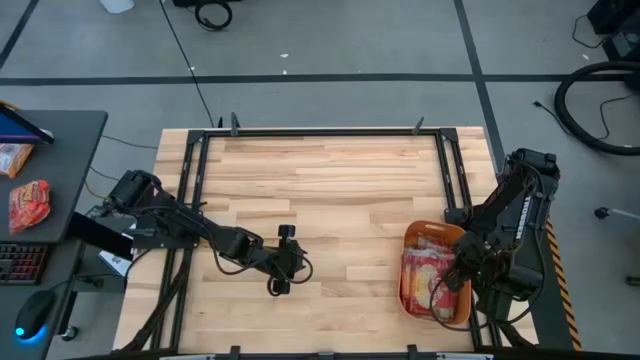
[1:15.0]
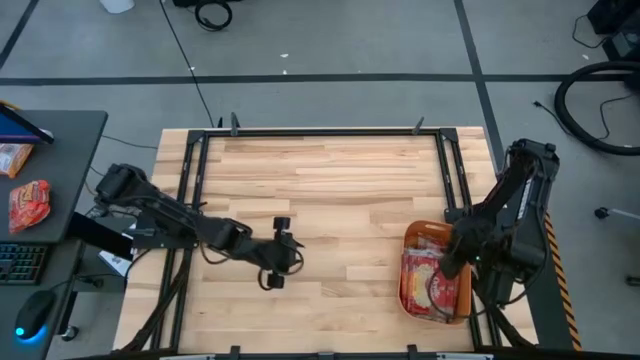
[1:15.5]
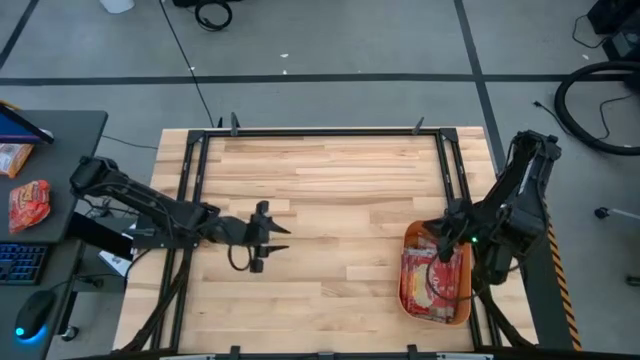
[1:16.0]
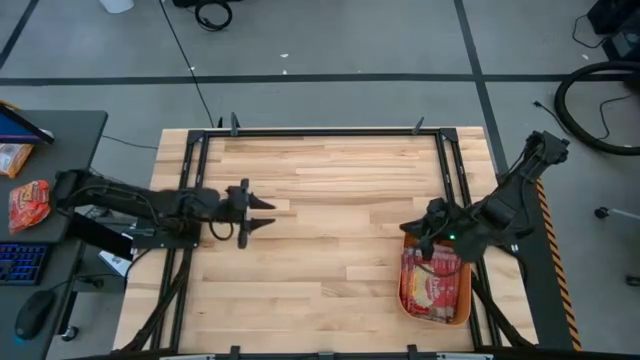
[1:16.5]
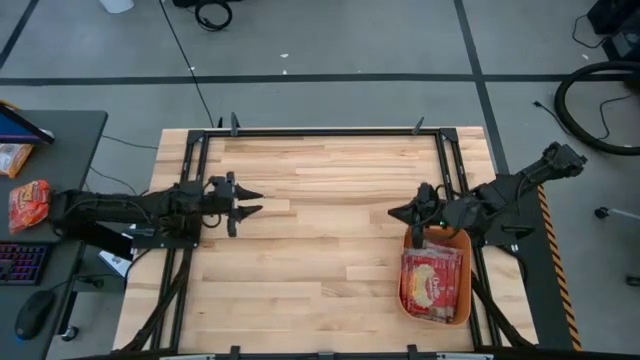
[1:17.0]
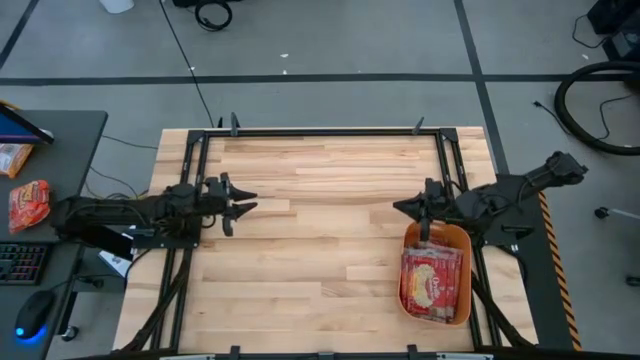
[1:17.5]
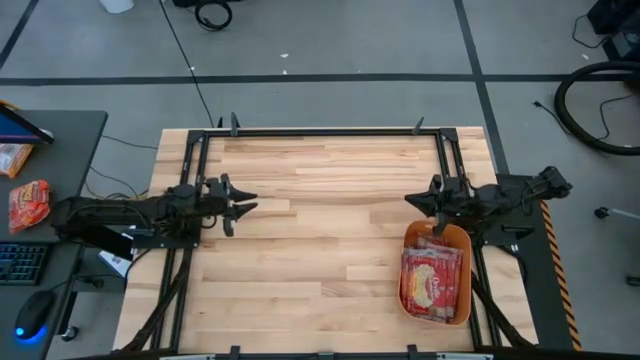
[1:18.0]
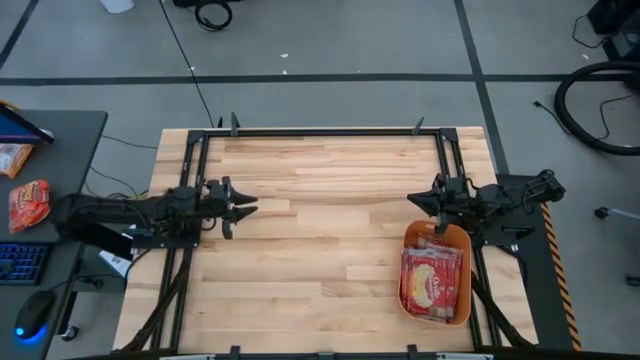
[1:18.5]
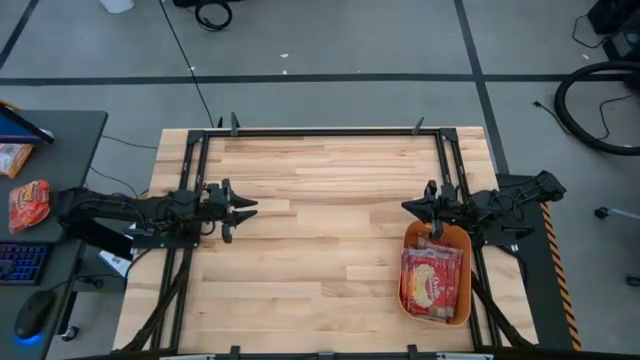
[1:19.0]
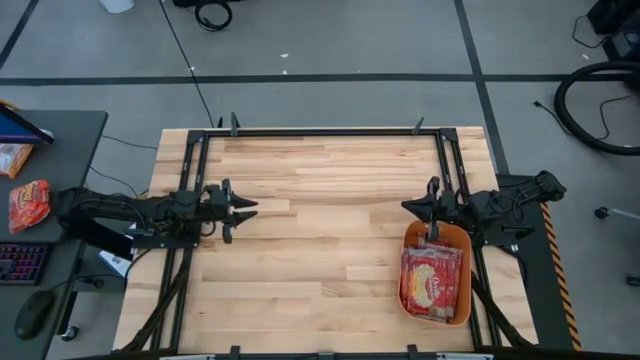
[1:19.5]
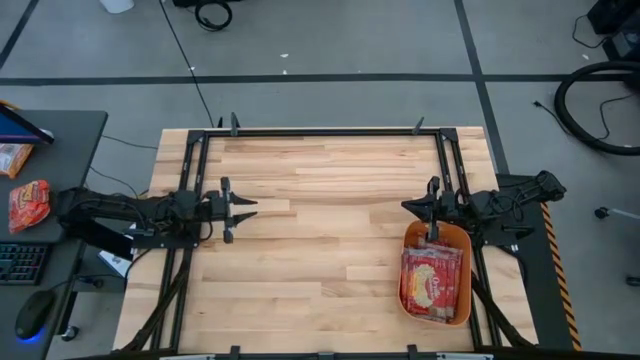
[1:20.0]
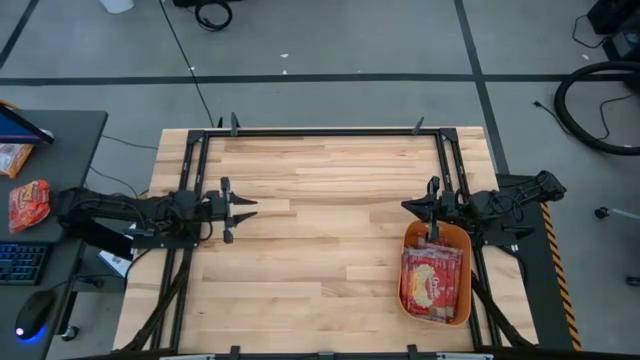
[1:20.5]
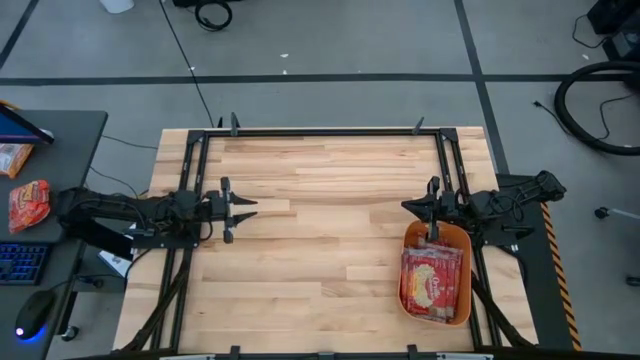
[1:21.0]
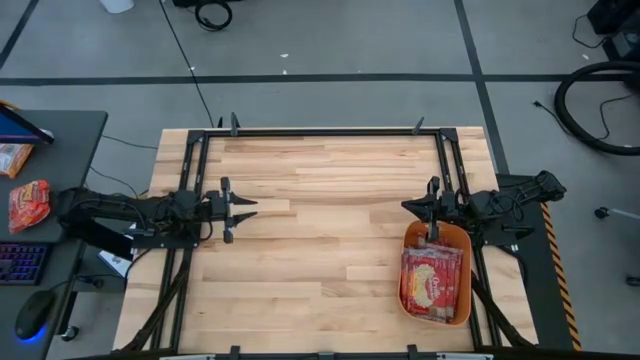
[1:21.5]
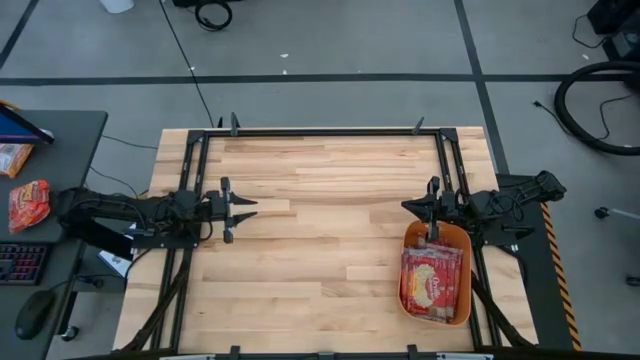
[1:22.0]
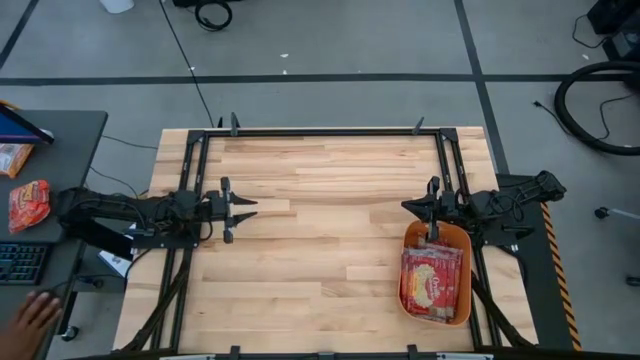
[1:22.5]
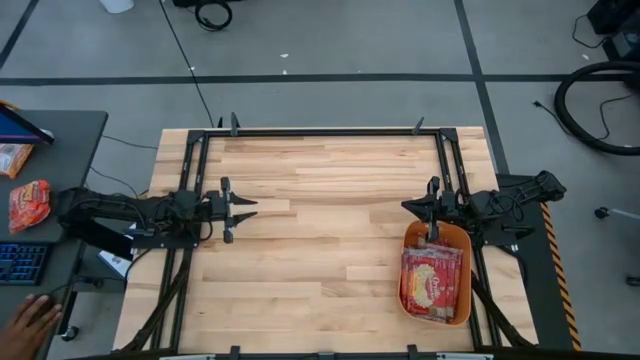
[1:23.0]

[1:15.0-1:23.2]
Task: Sort popcorn bags into baskets
Return to Home Position

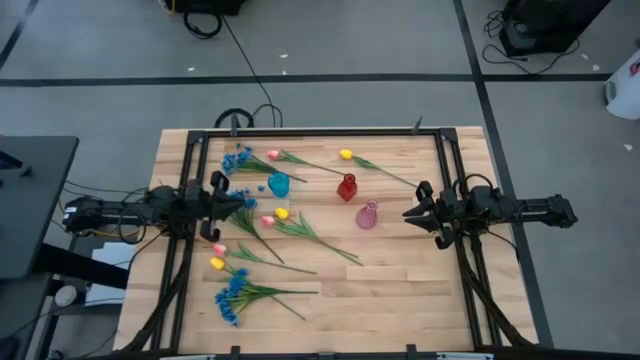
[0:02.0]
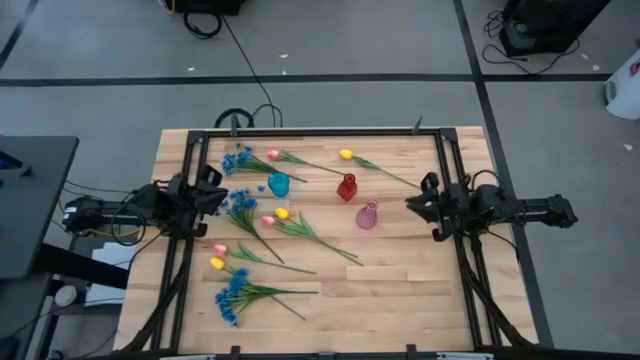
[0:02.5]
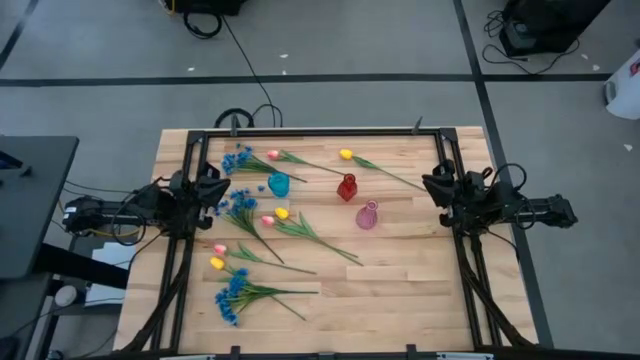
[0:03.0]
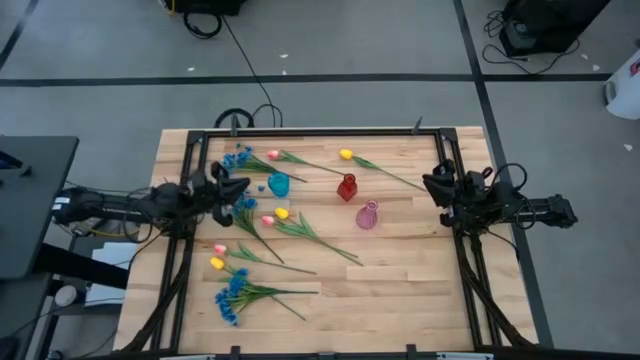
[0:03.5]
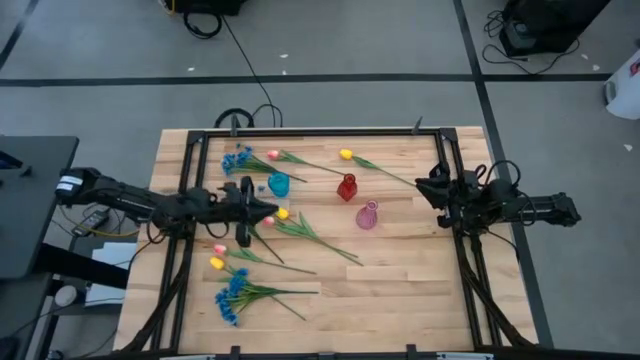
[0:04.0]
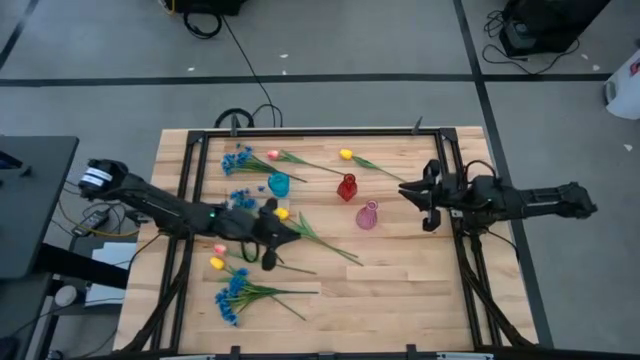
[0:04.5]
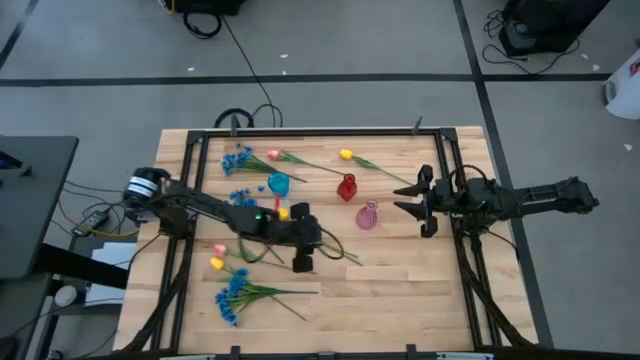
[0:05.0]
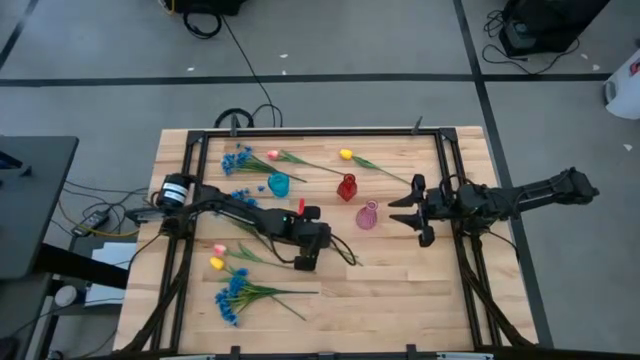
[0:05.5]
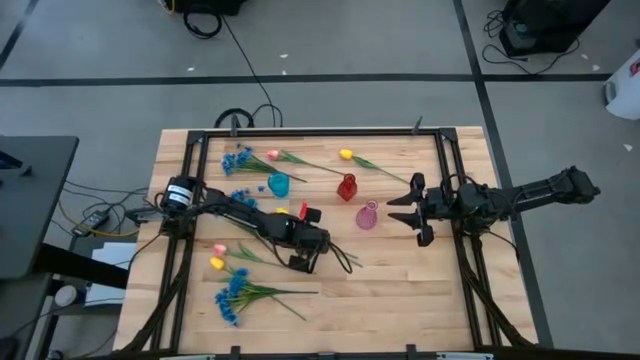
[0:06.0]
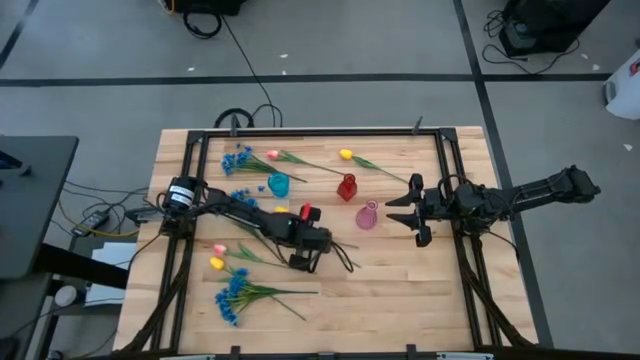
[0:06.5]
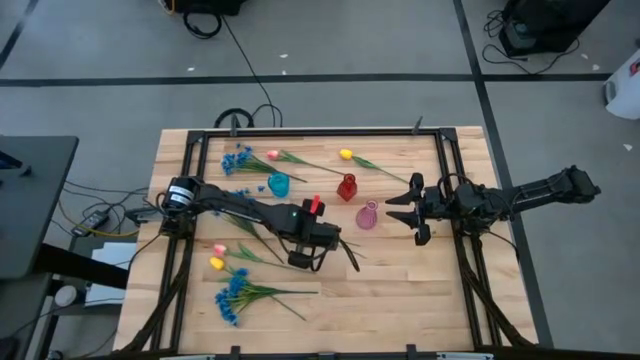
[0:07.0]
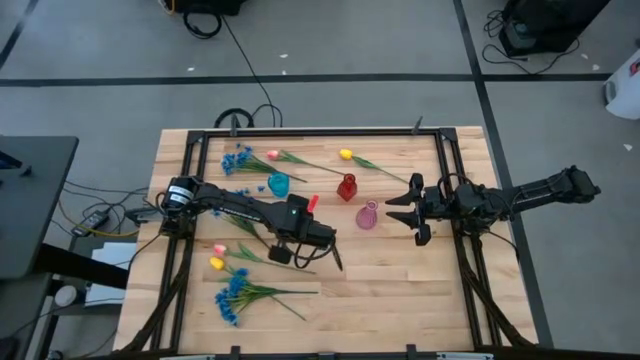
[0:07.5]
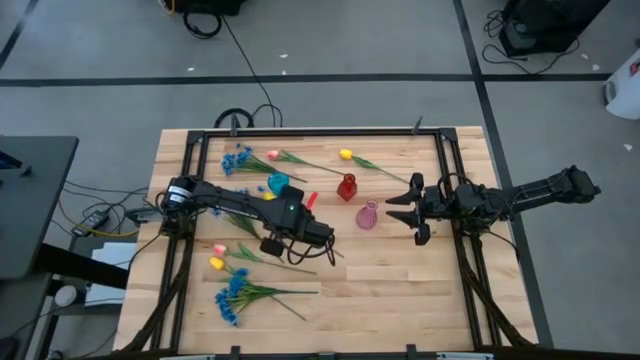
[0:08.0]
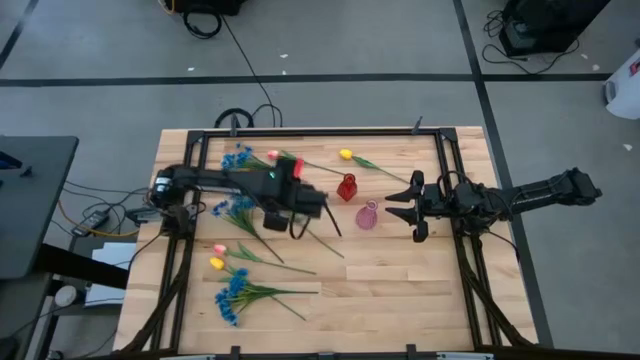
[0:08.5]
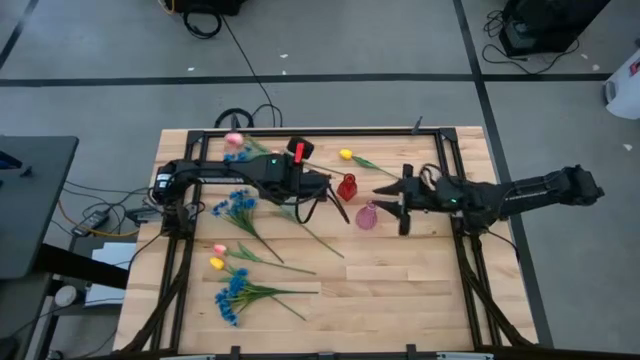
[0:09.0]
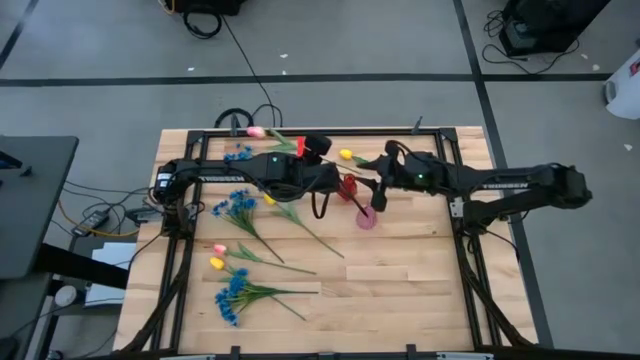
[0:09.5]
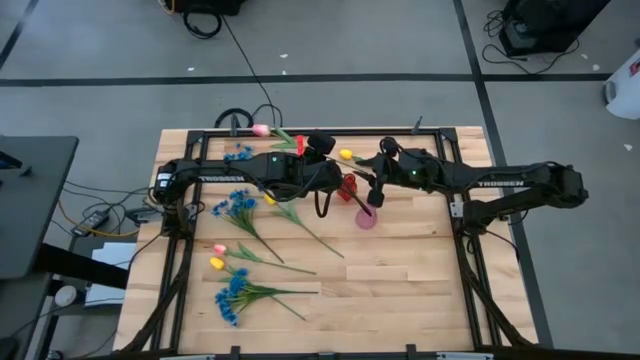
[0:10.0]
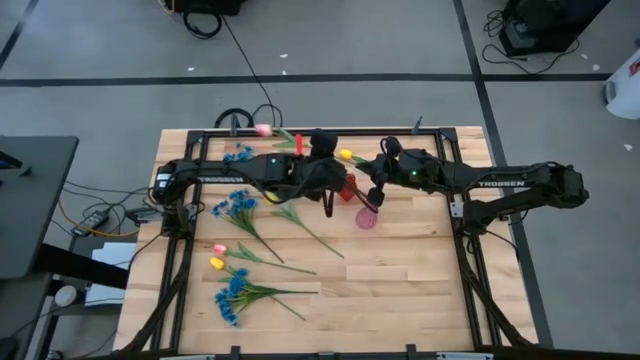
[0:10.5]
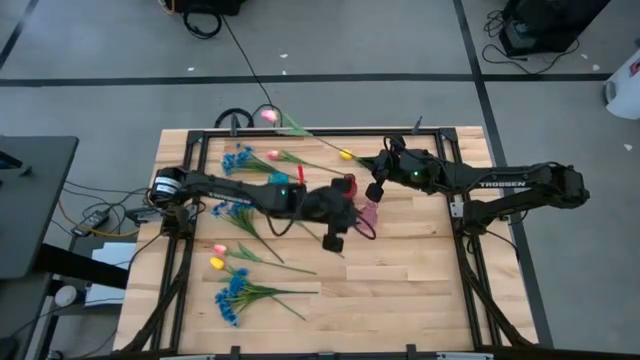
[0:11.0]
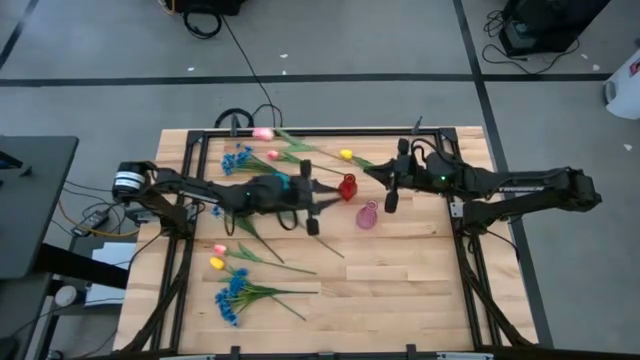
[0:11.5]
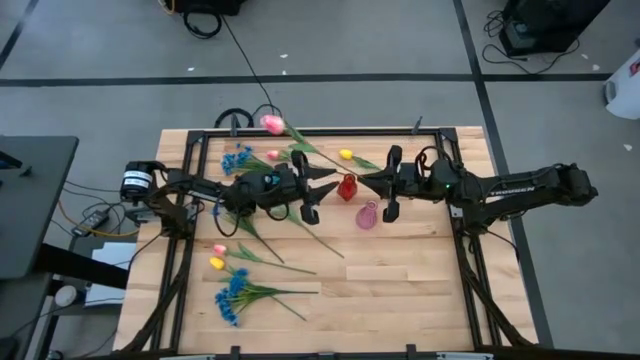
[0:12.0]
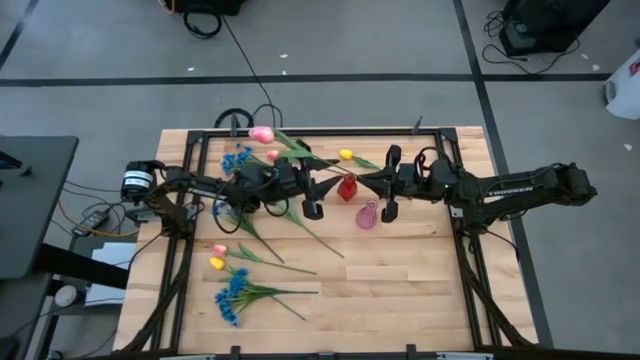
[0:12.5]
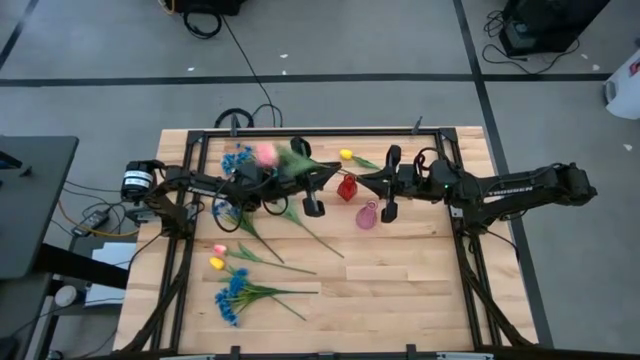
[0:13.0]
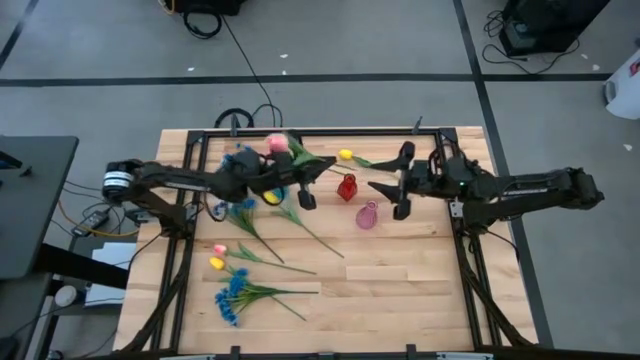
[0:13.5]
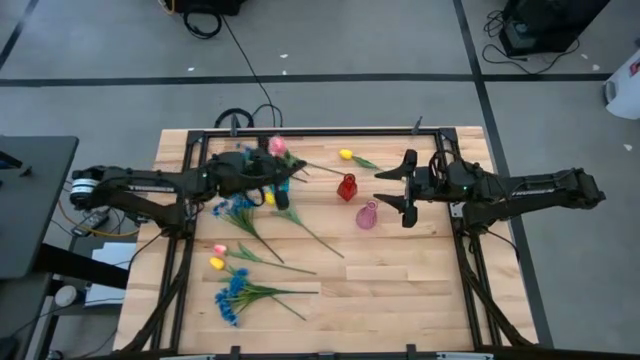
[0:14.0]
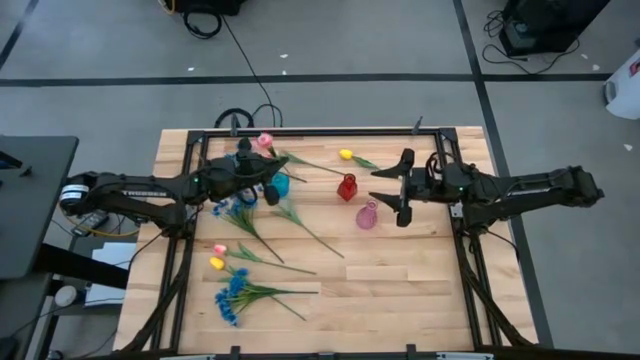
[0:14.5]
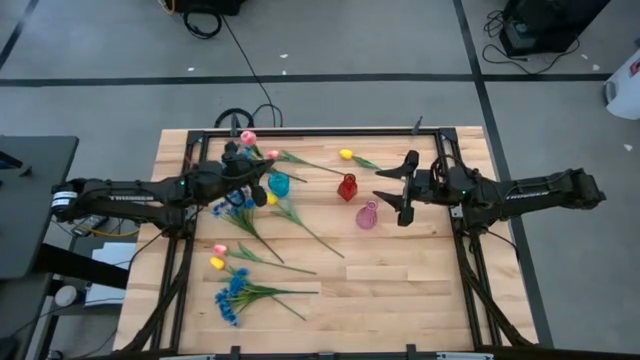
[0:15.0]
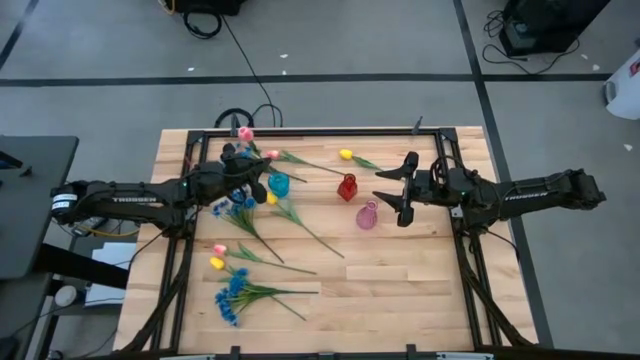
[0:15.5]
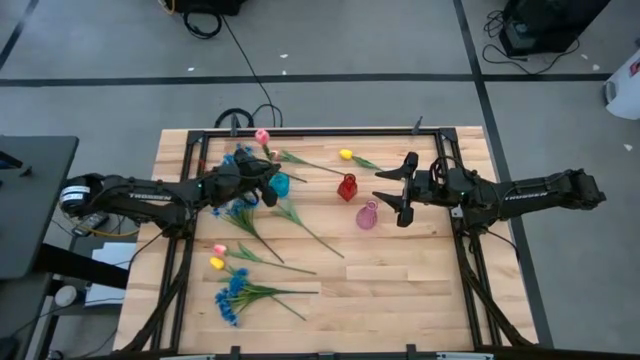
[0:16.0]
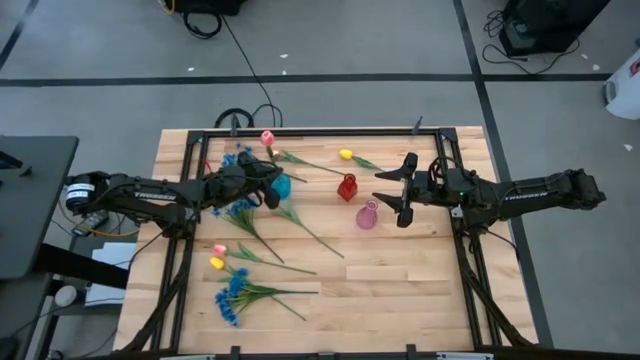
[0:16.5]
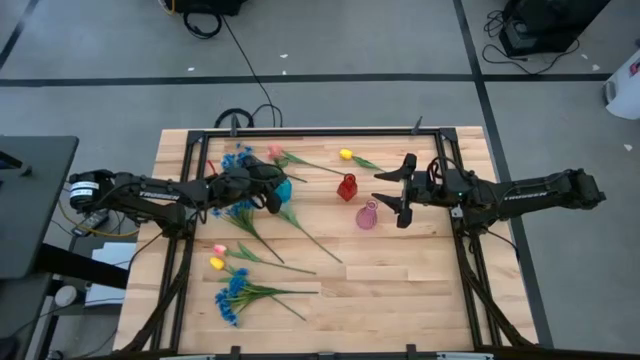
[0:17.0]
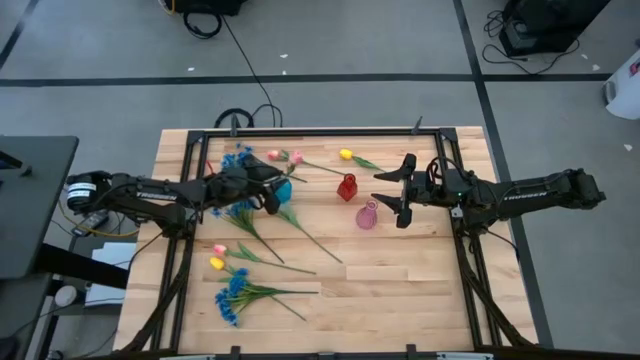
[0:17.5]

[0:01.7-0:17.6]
Task: Sort flowers into vase by color
Put the middle pink flower into the blue vase
